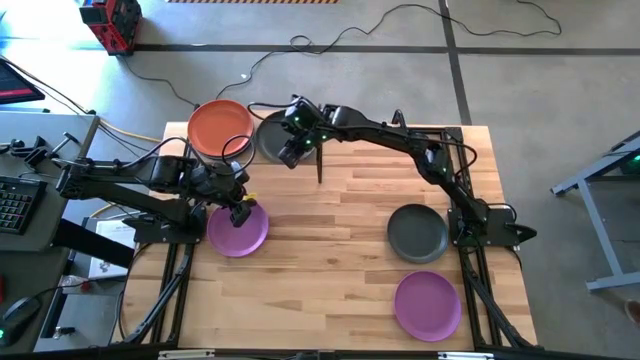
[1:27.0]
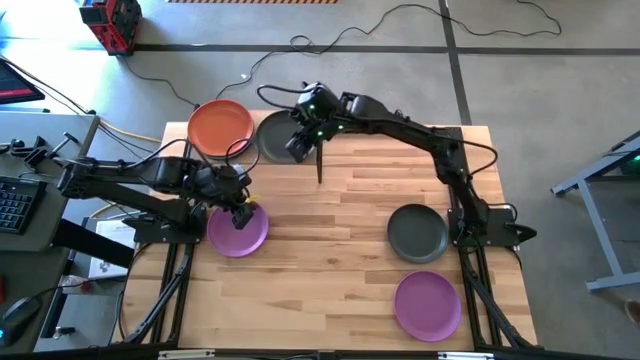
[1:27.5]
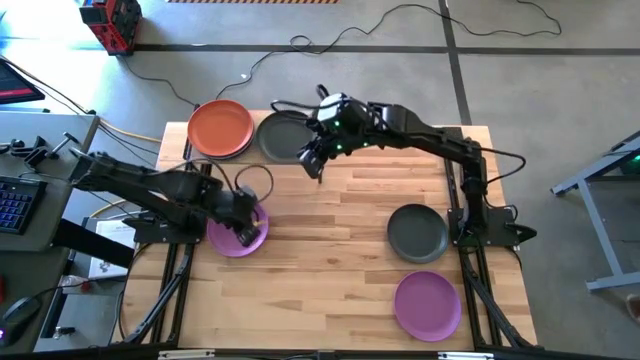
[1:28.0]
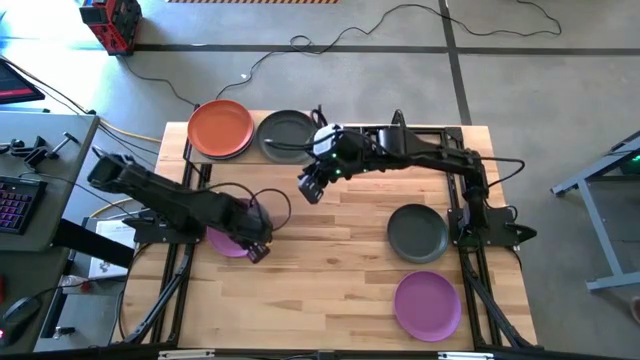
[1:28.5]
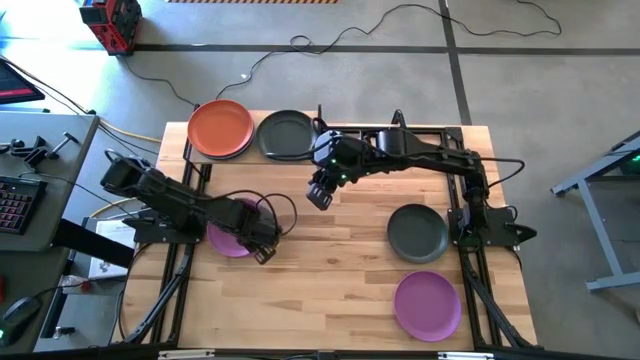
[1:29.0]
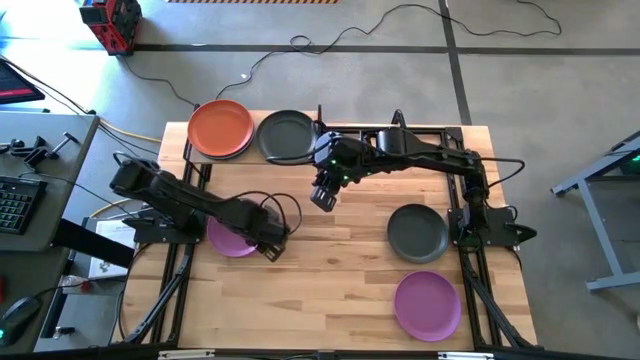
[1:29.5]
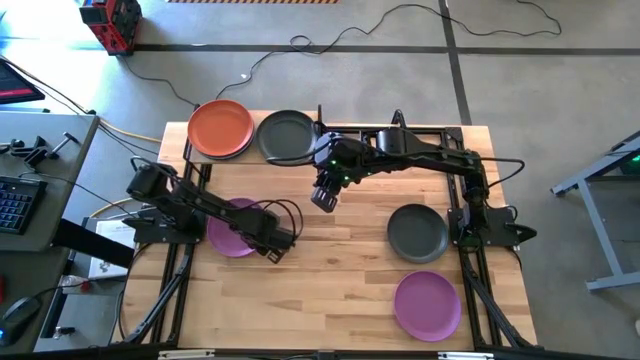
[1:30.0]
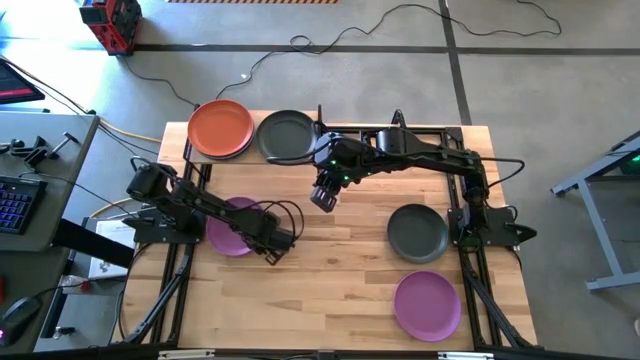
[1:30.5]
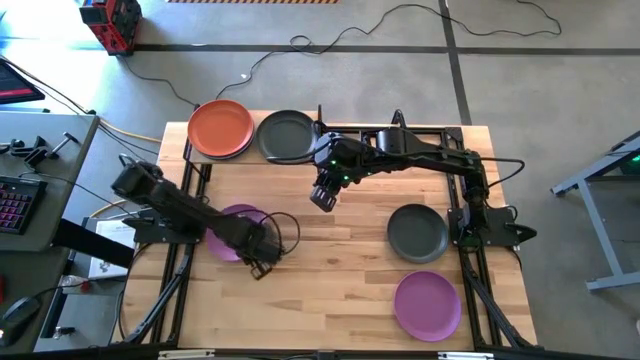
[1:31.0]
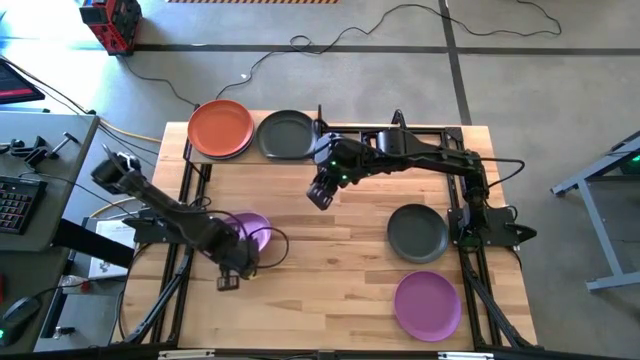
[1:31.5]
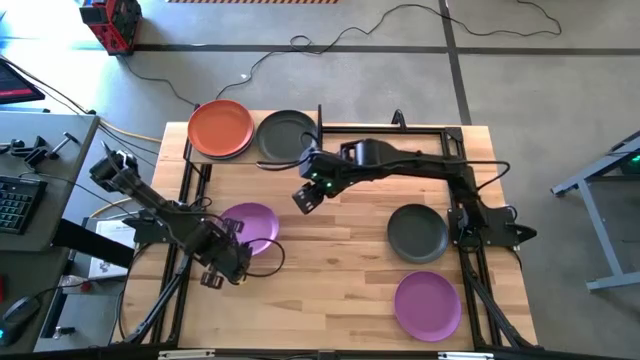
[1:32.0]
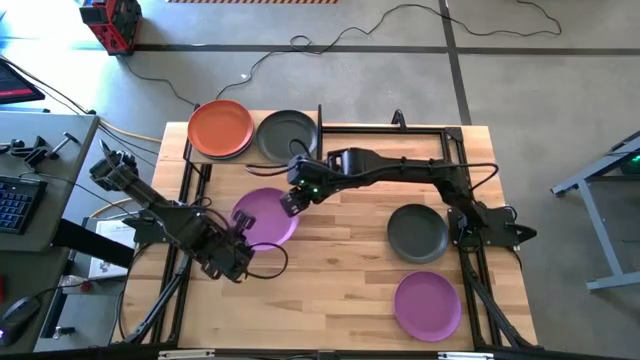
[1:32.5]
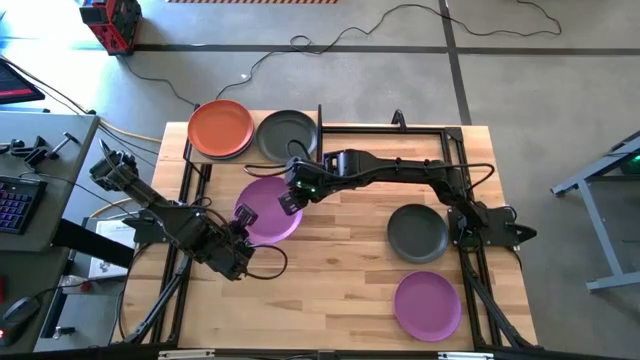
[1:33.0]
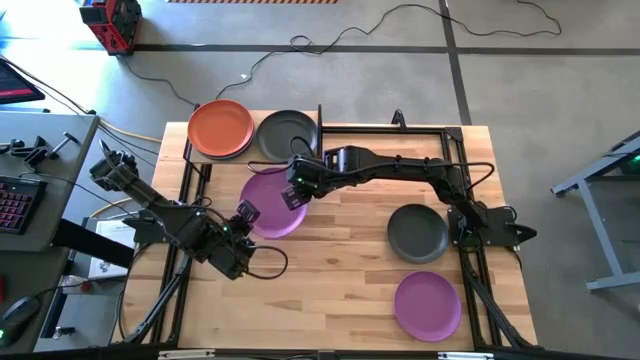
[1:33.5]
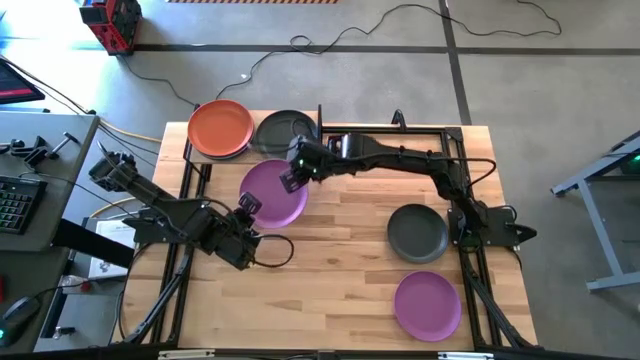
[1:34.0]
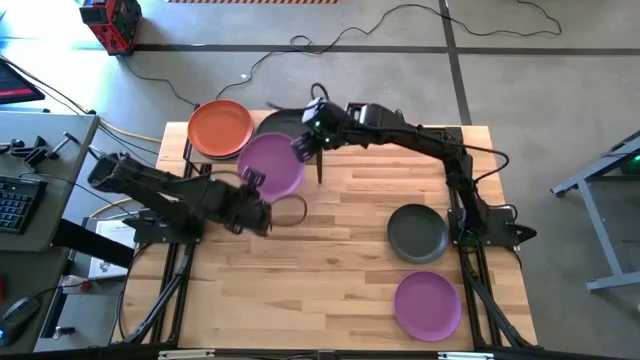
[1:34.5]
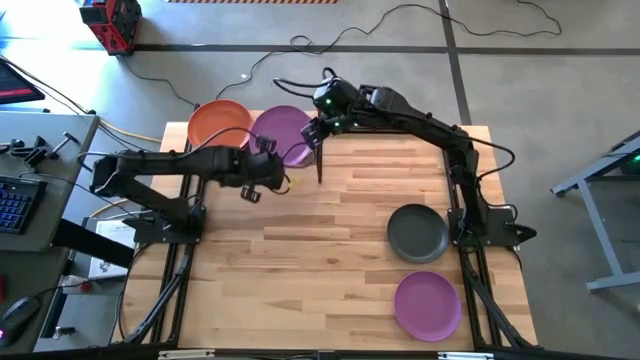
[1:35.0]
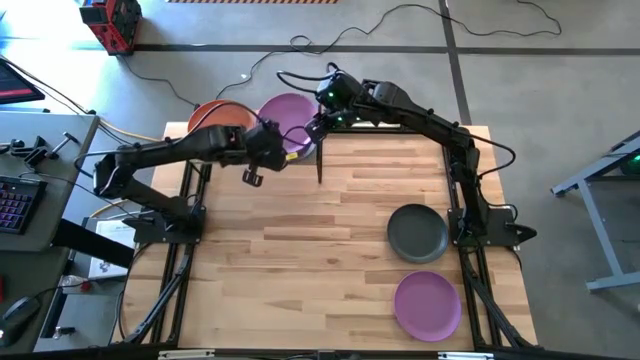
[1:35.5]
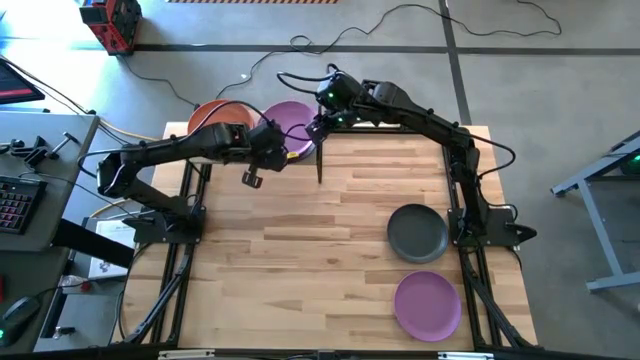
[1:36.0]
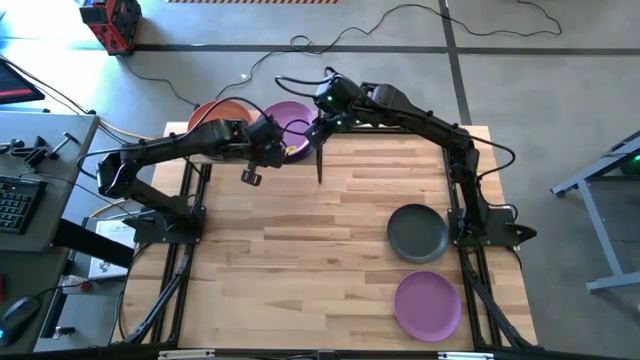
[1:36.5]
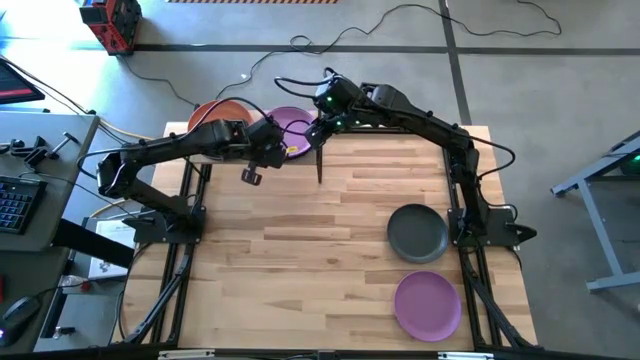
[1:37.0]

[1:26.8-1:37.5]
Task: Place and stack plates onto a shelf
Stack the left purple plate on top of the black plate on the shelf

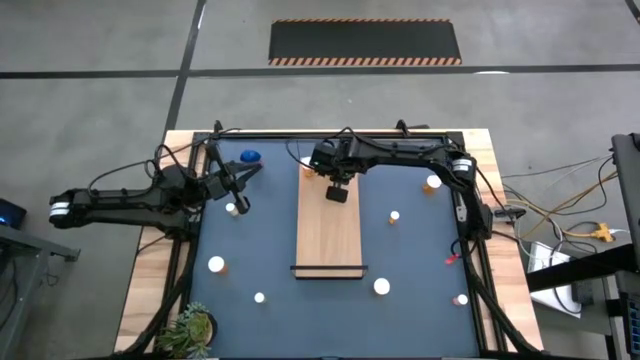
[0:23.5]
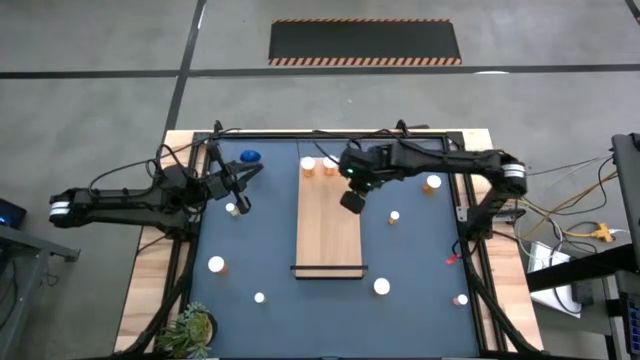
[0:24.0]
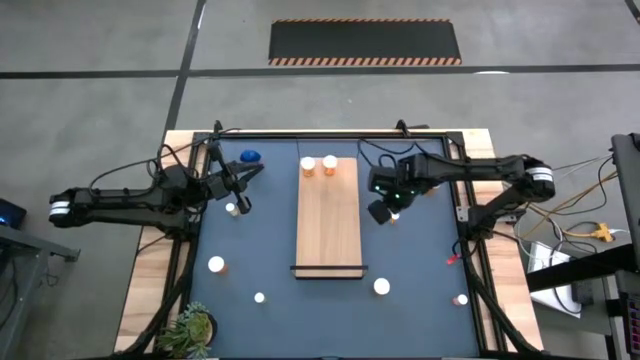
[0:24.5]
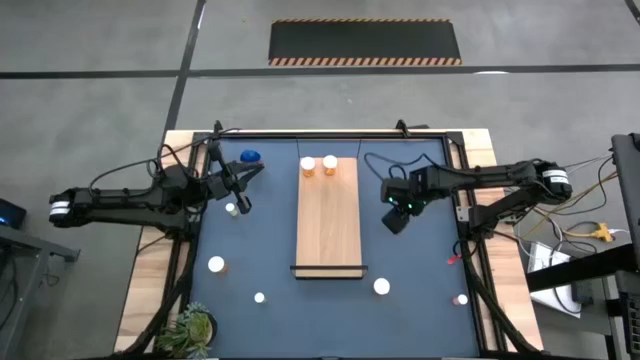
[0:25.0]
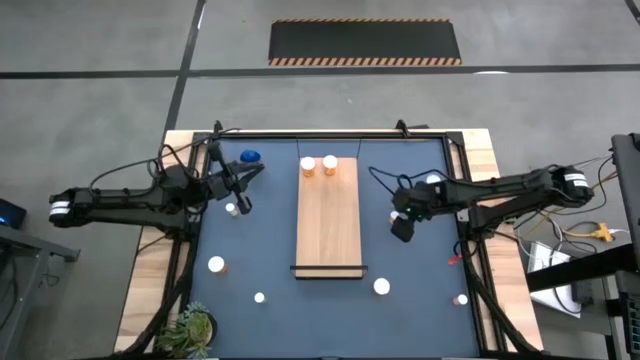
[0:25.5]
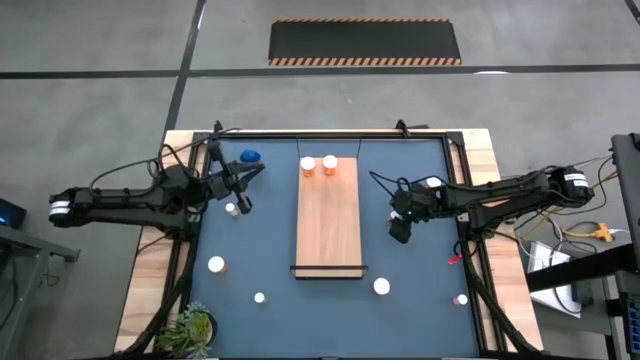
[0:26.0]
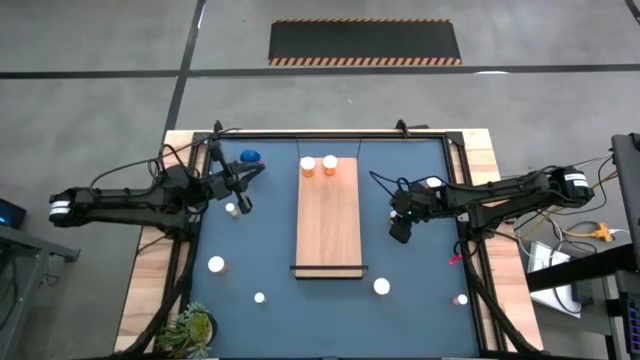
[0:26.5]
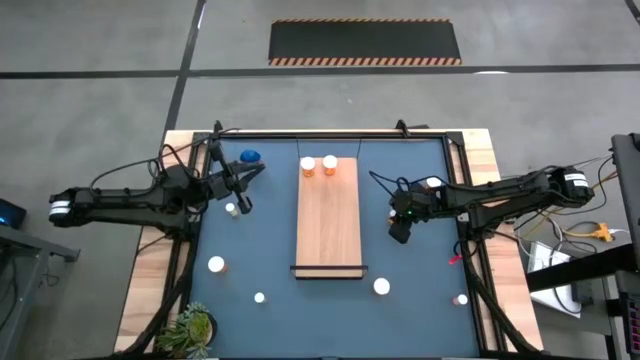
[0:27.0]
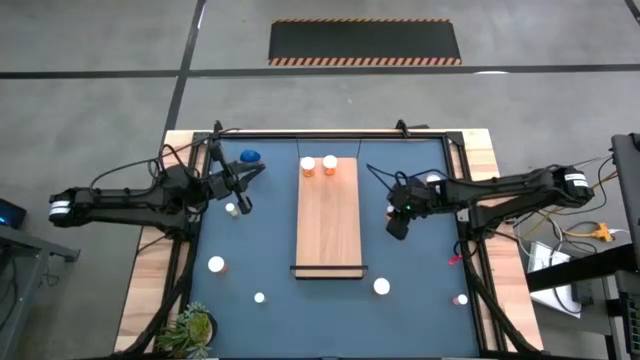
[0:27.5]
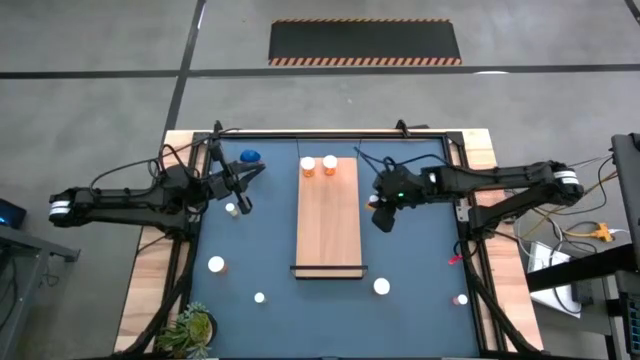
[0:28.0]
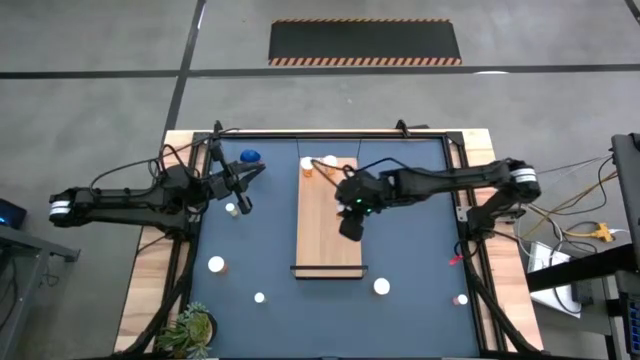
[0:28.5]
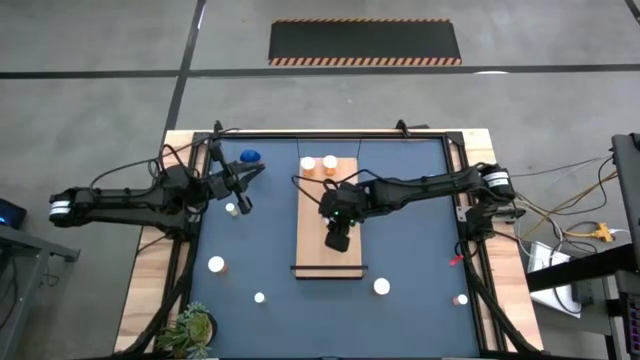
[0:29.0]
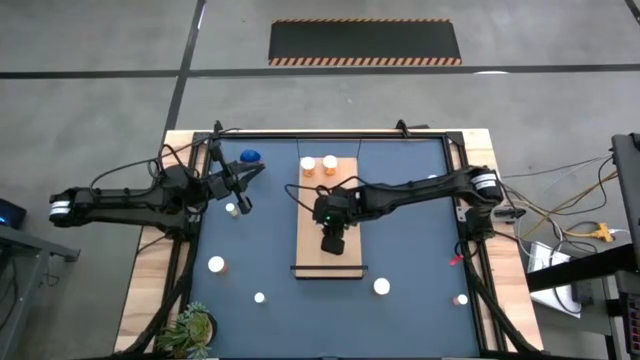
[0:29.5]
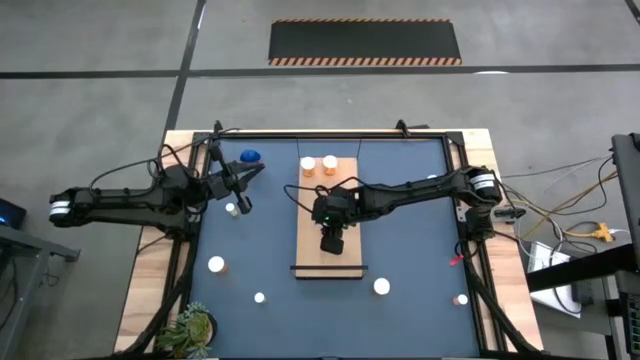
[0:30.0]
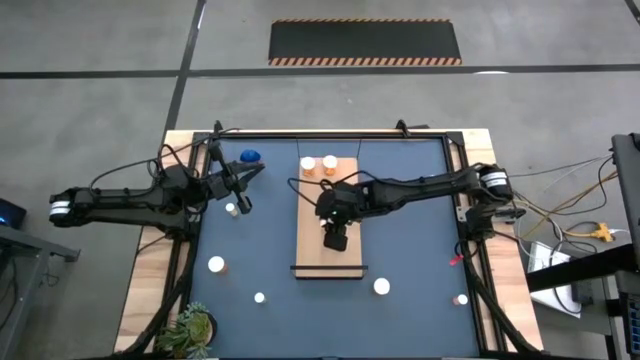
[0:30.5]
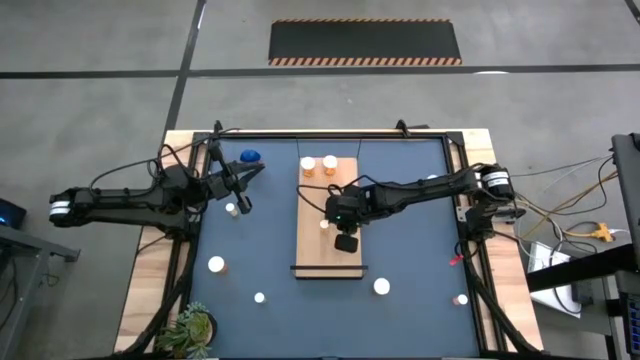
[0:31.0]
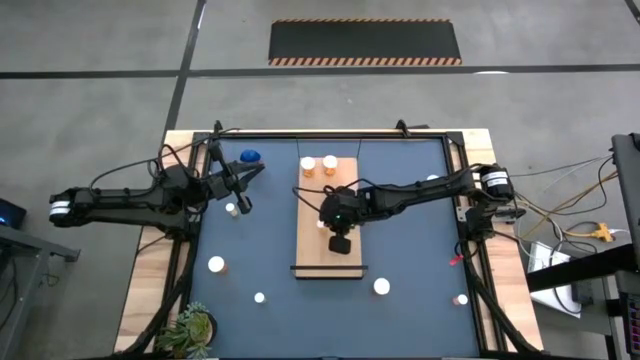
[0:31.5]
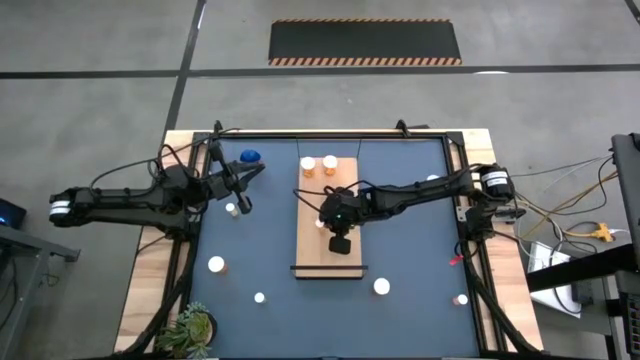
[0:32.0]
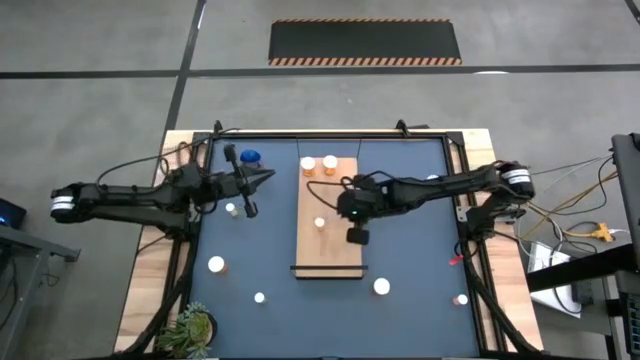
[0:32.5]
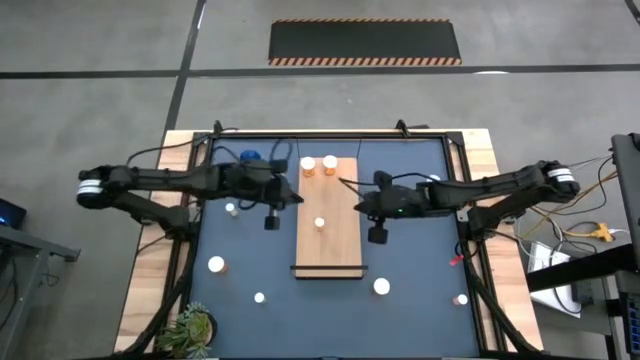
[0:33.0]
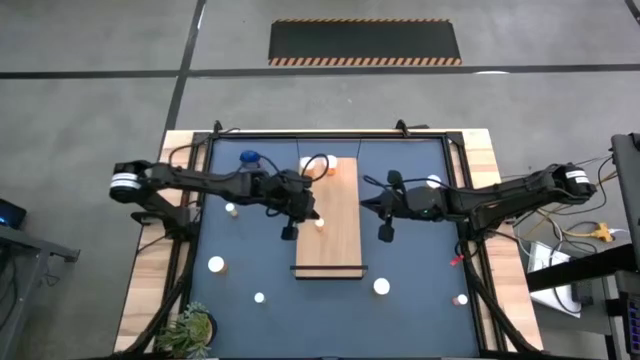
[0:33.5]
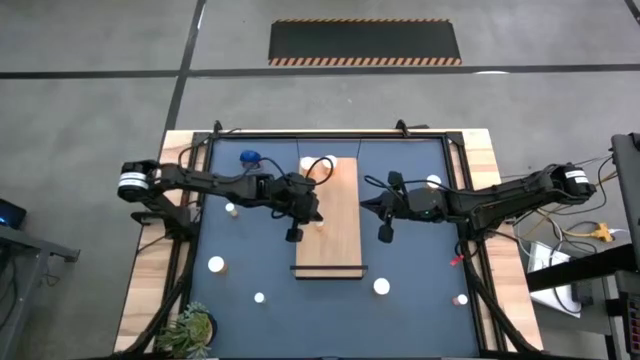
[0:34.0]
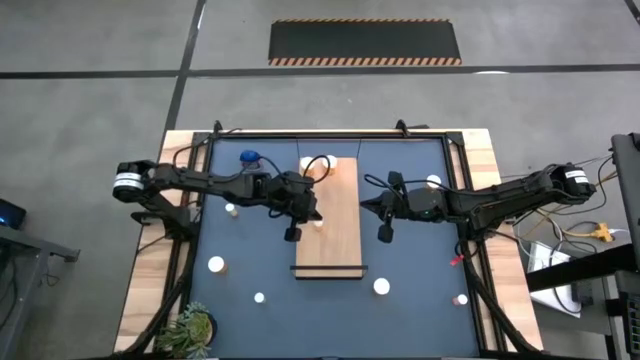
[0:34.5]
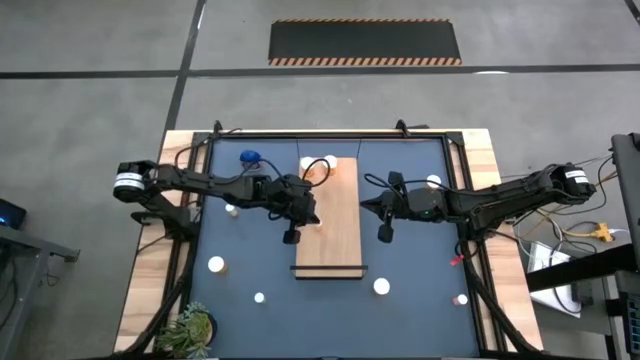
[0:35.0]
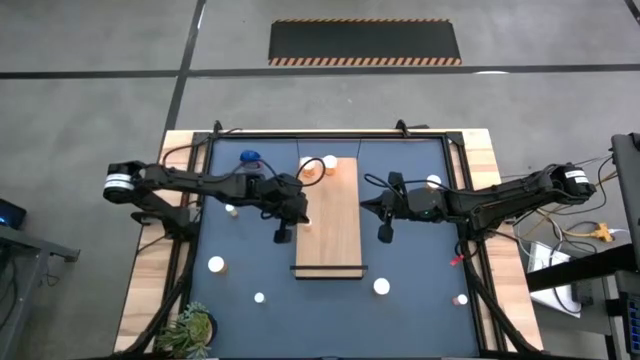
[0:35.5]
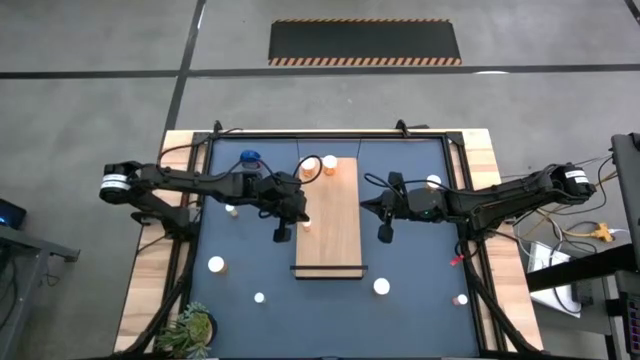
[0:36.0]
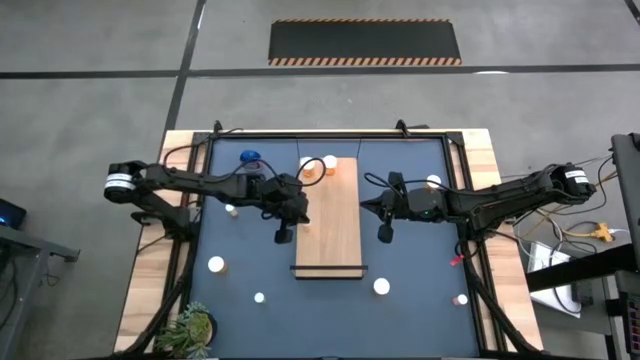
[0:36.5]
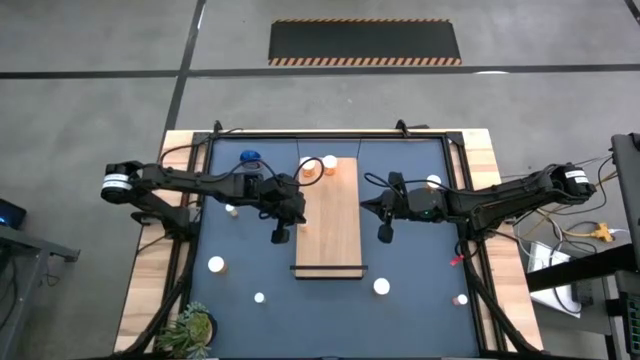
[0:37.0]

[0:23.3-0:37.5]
Task: Pick and place medicine bottles onto shelf by color
Put the small orange pill bottle on the shelf
